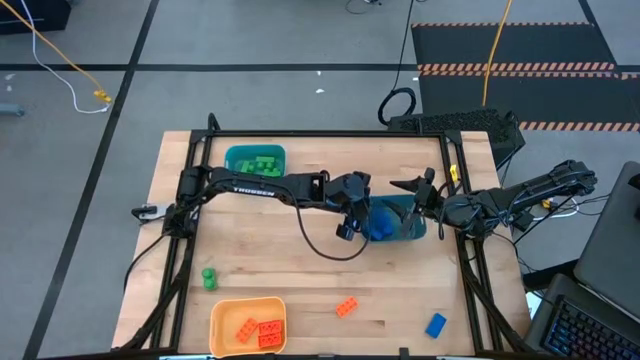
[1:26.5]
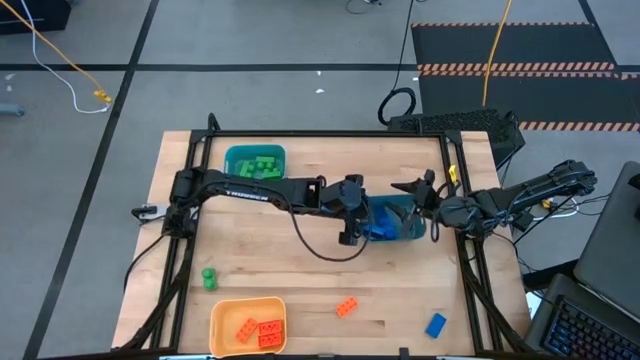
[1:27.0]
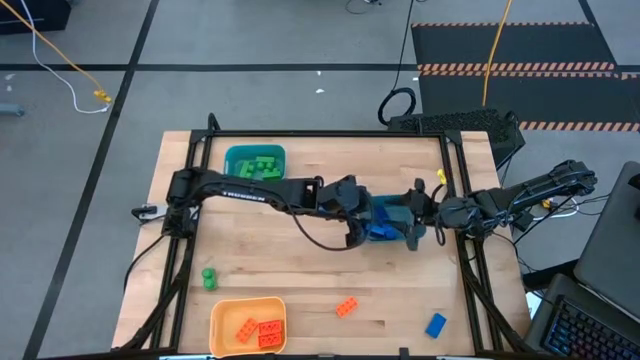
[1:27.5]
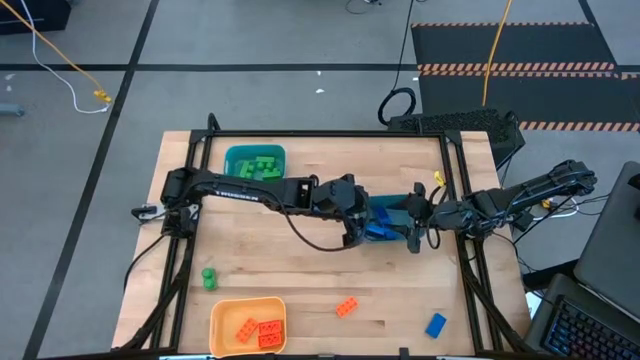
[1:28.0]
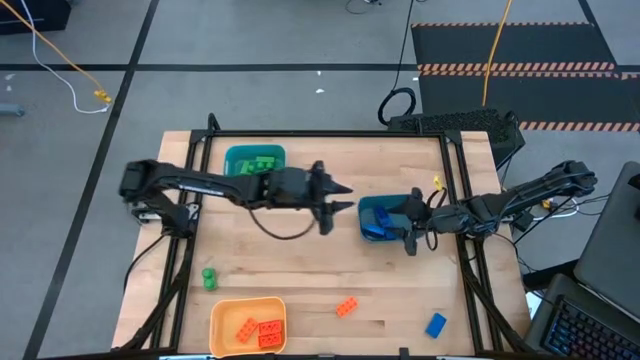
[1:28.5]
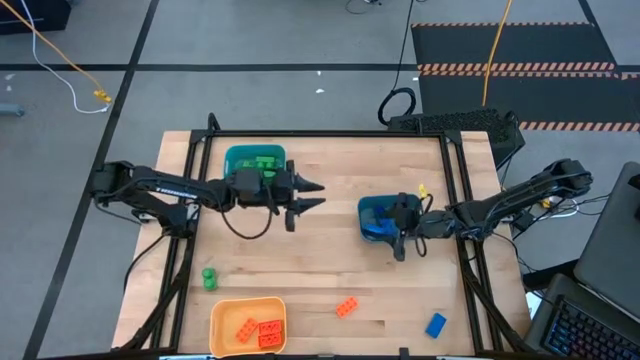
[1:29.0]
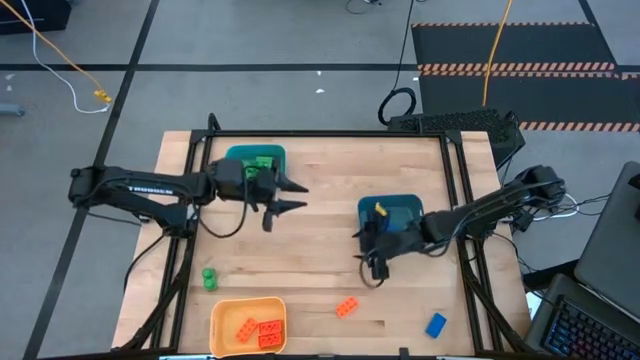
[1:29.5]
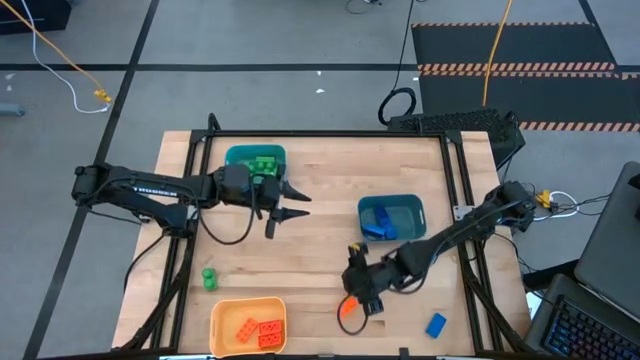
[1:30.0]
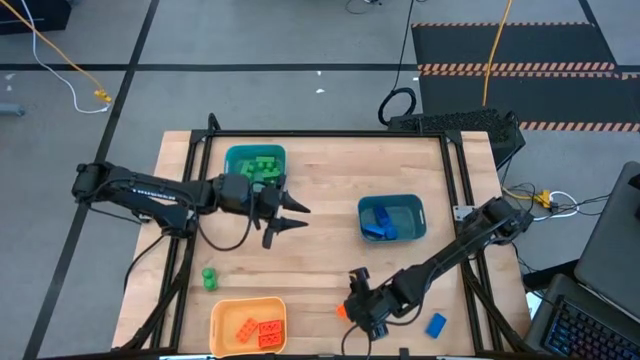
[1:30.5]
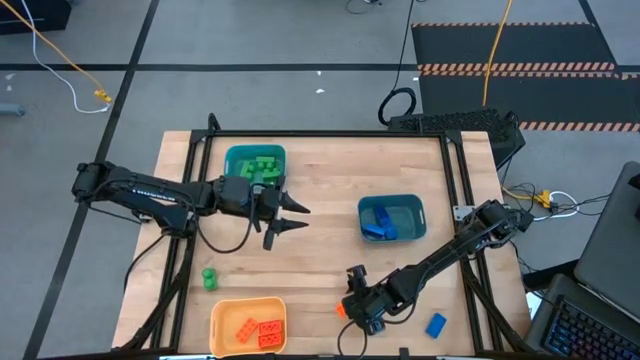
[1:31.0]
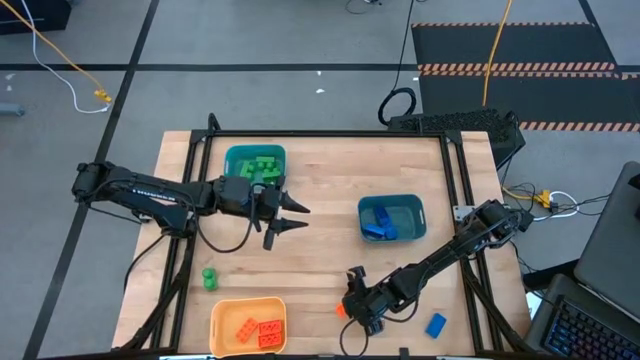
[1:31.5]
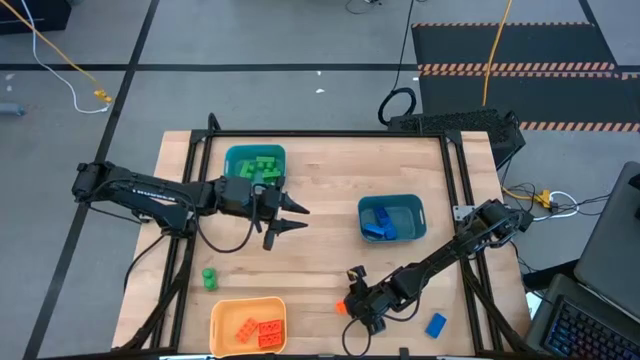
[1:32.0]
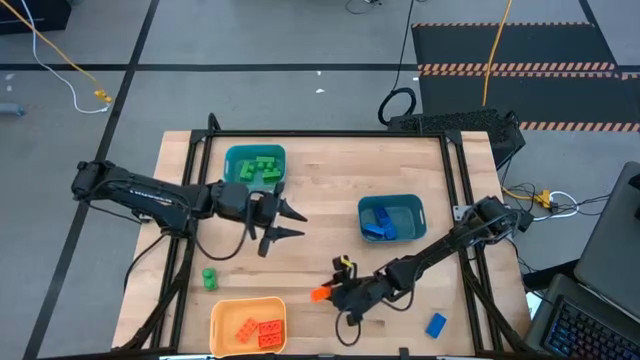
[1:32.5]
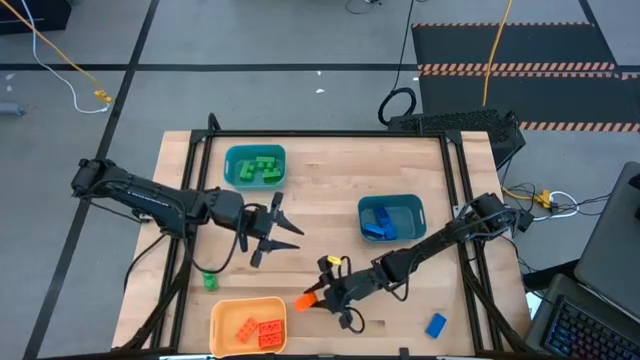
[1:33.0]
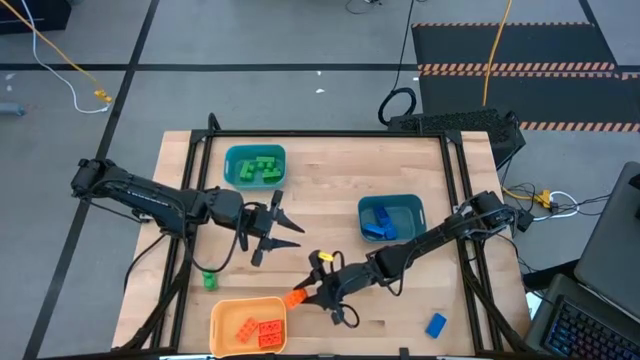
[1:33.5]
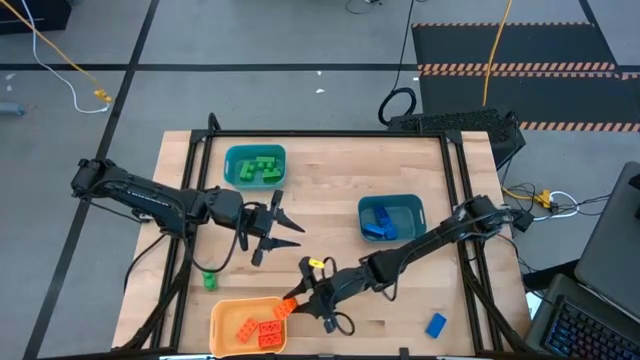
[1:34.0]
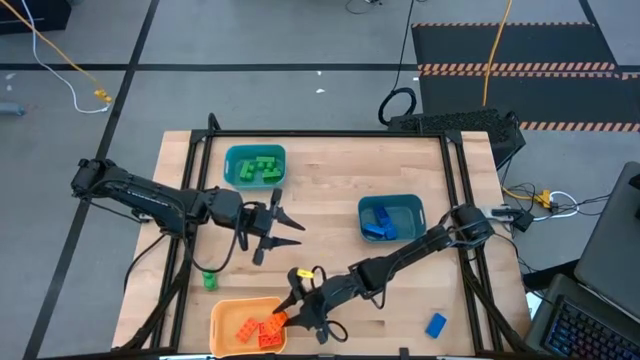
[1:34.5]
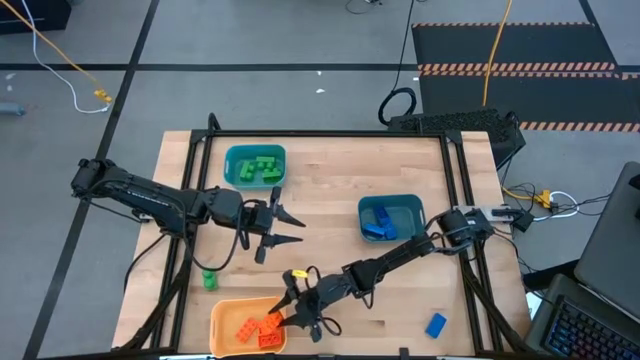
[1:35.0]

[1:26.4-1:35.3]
Task: Sort & place blocks by color
Put the orange game piece into the yellow bin

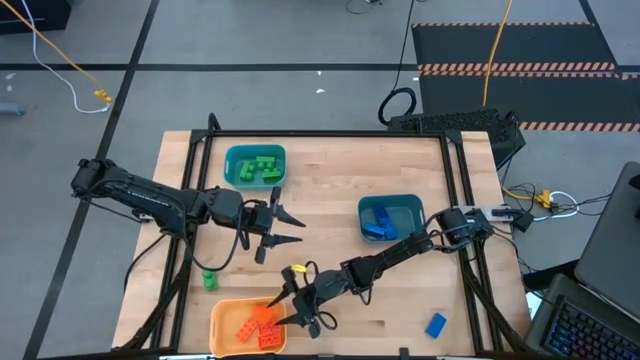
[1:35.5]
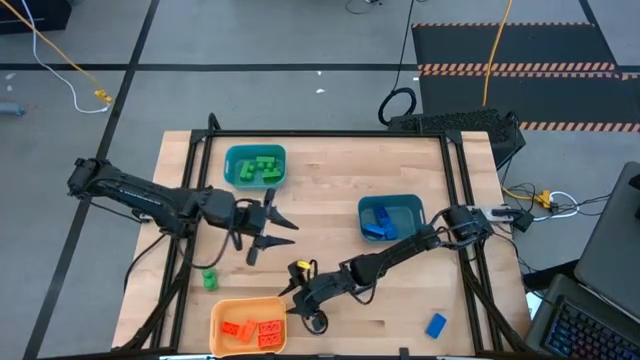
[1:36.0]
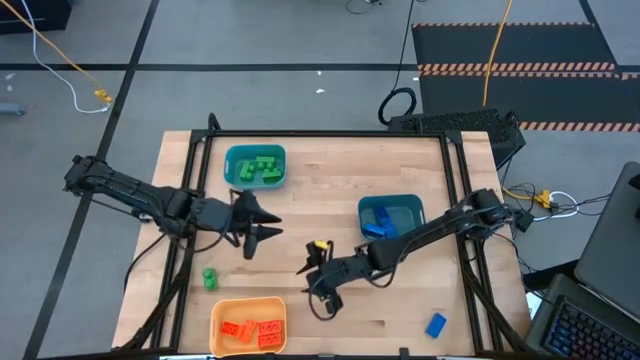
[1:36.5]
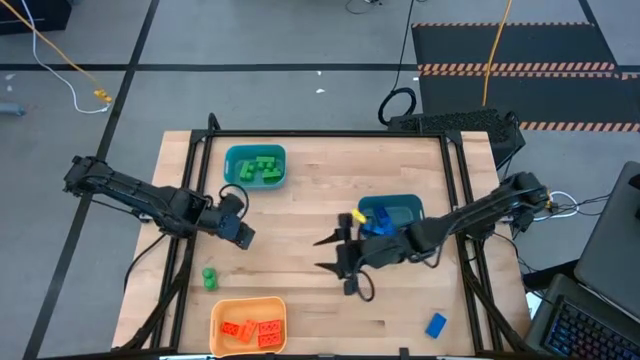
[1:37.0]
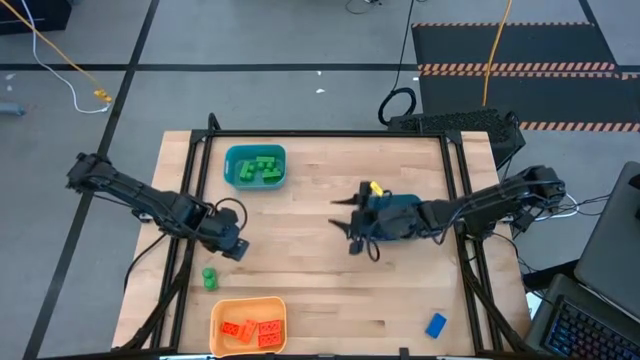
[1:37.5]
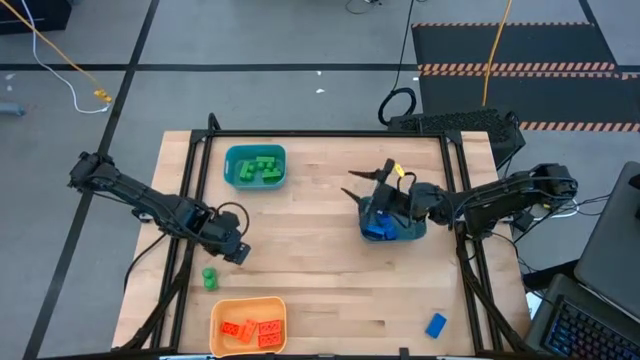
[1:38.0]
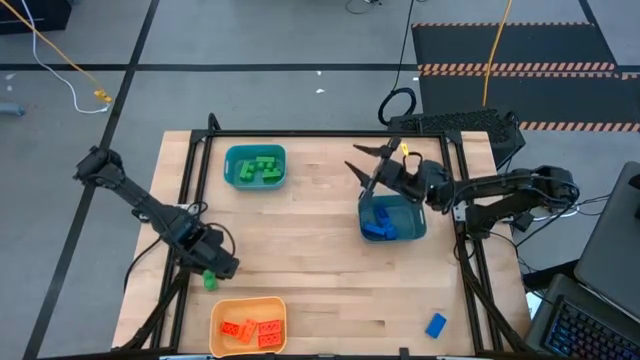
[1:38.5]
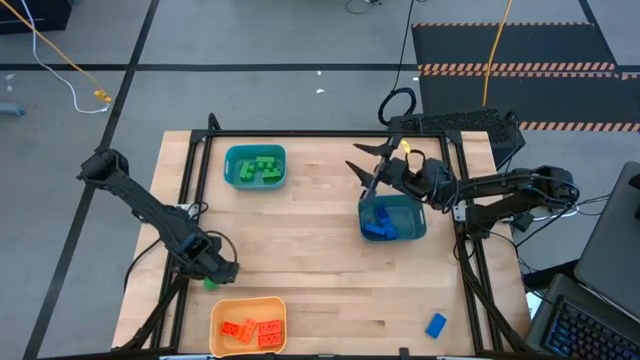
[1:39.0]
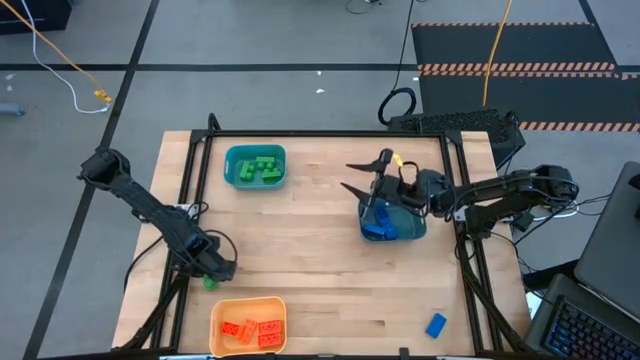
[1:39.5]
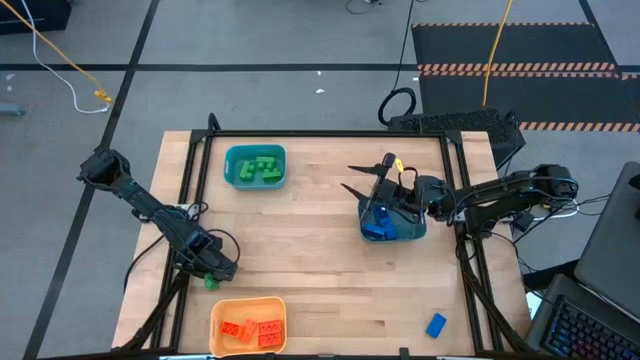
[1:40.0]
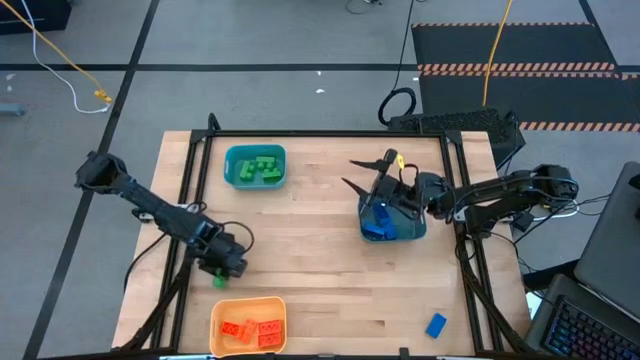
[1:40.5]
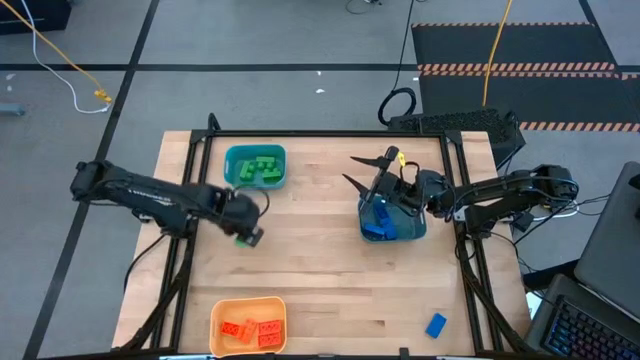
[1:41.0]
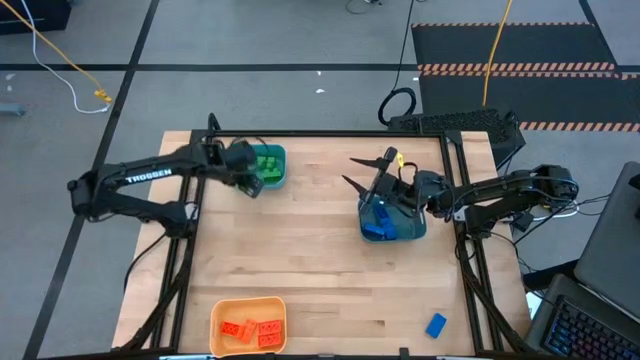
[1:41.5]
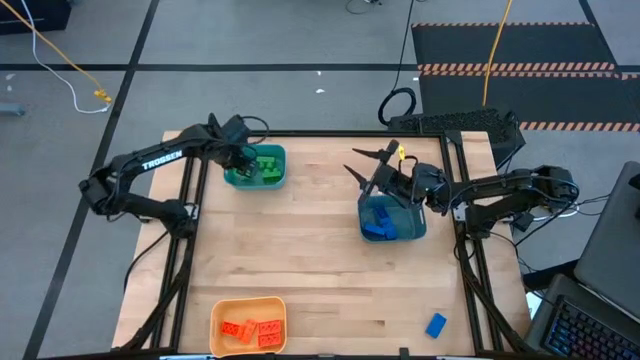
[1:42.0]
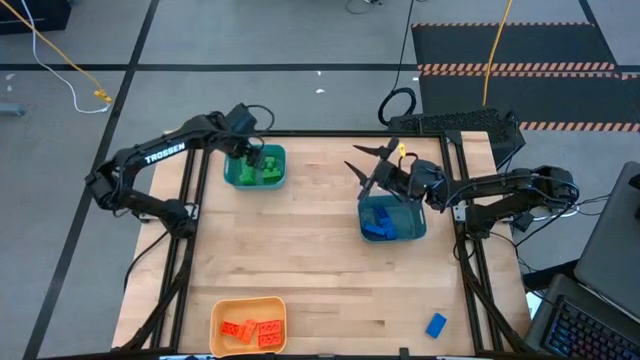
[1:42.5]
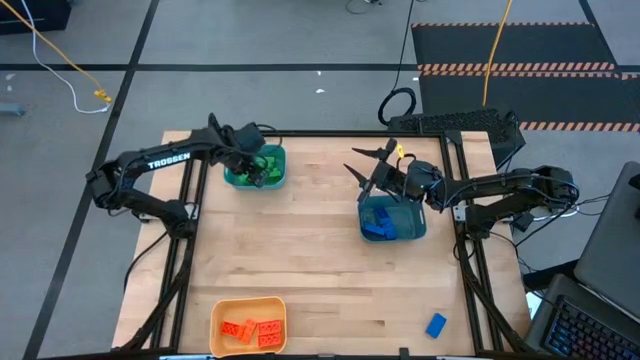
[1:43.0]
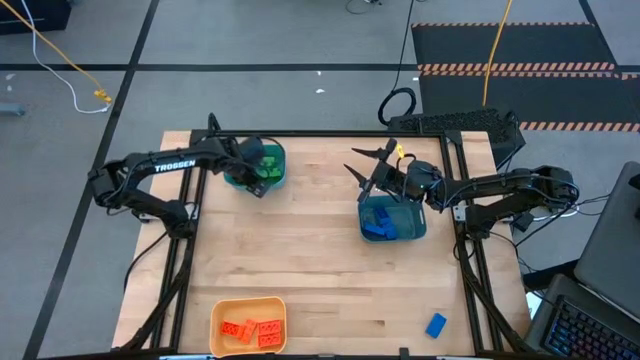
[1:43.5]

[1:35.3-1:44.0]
Put the green game piece into the light blue bin

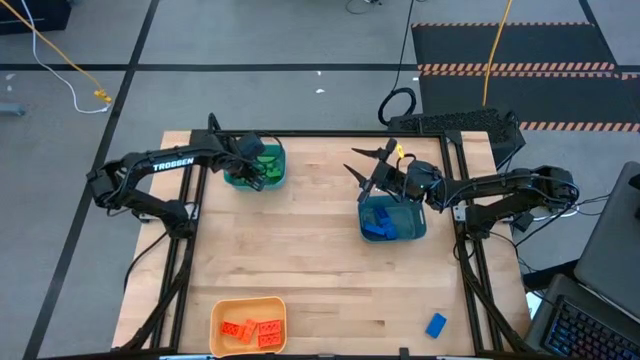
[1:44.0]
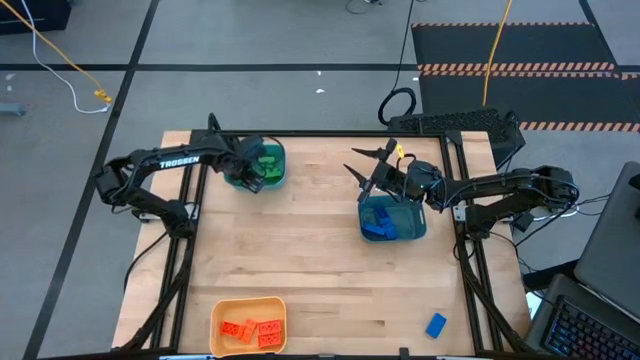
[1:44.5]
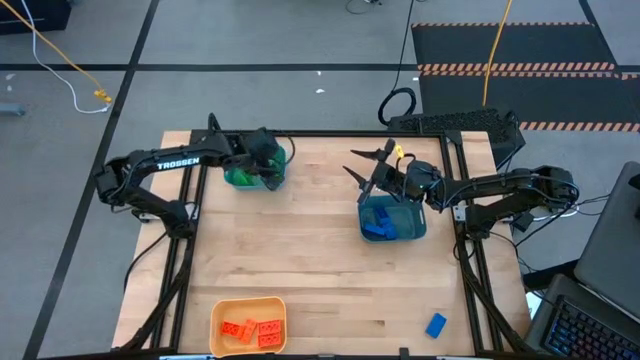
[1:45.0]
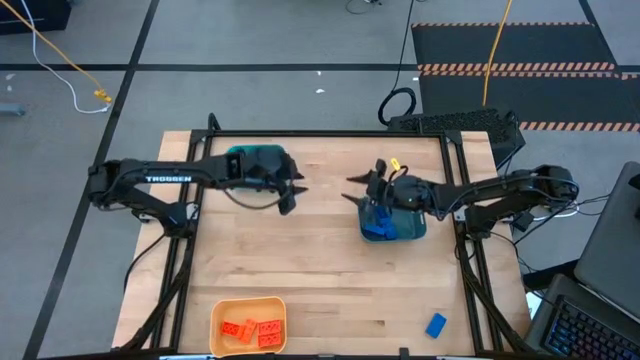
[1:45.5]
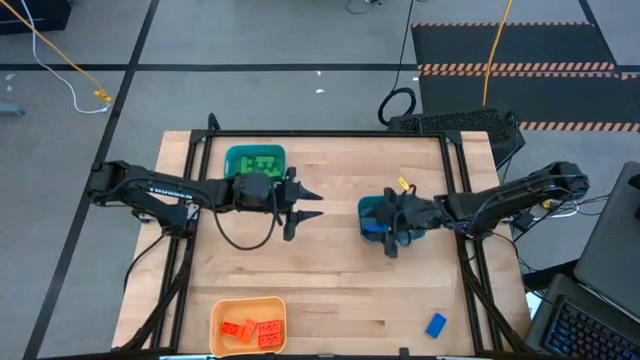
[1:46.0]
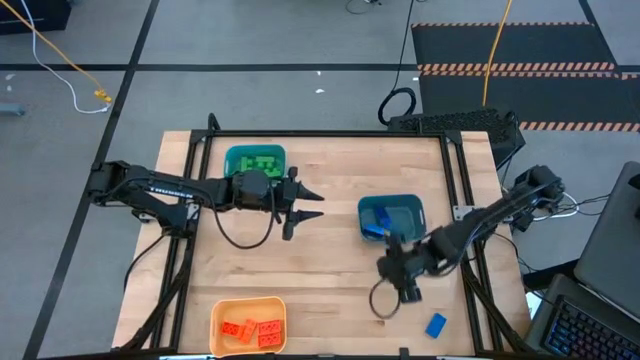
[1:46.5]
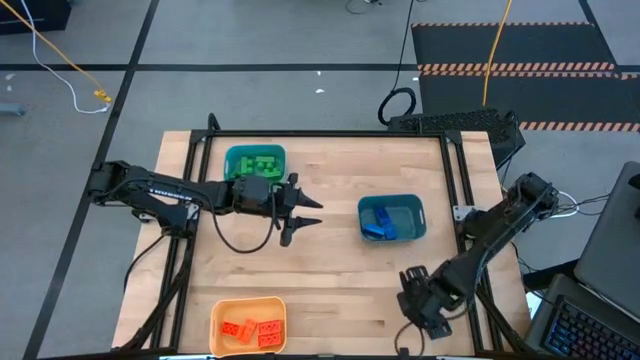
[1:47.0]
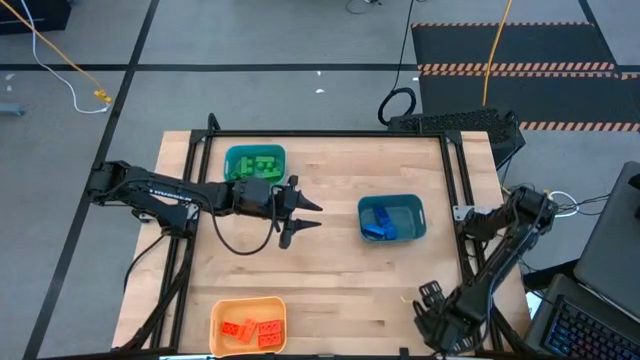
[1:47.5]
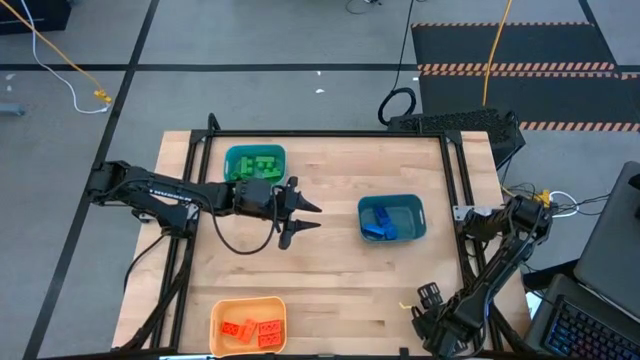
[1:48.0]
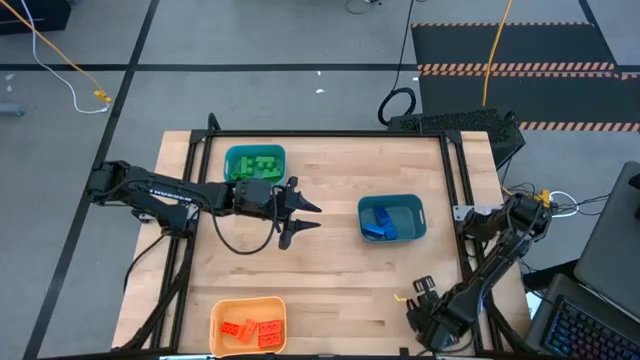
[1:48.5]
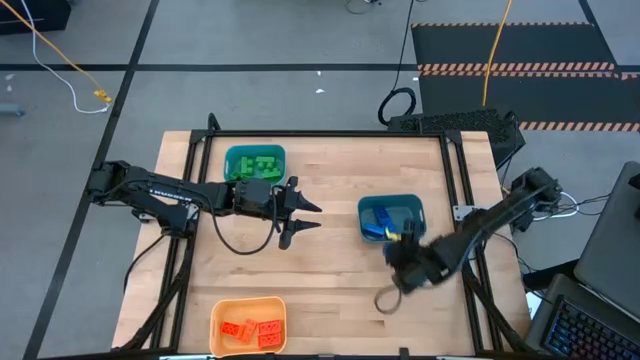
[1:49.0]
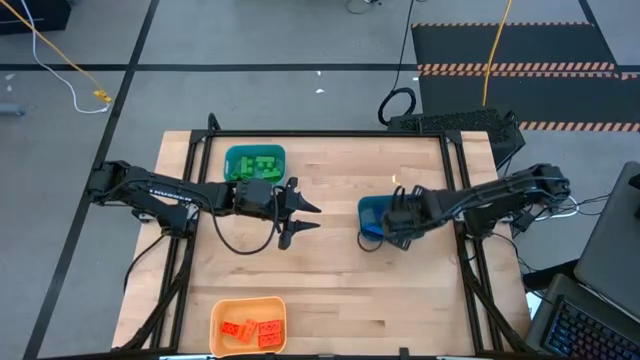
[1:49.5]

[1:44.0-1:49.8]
Put the blue game piece into the dark blue bin
